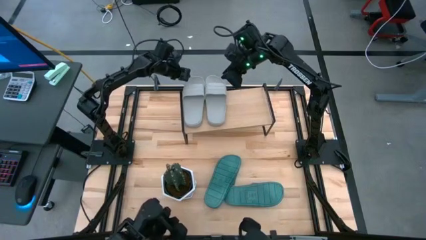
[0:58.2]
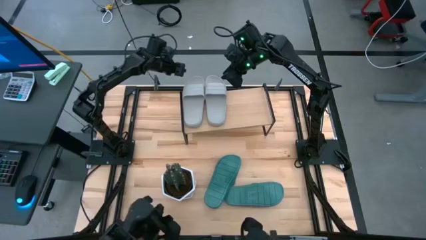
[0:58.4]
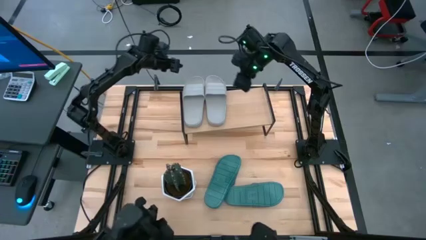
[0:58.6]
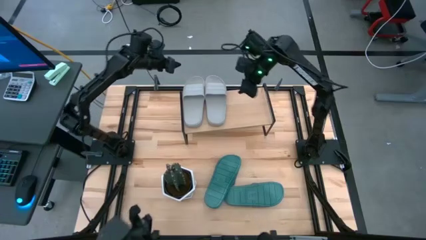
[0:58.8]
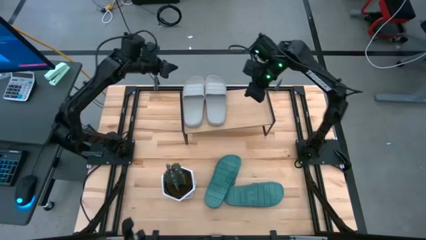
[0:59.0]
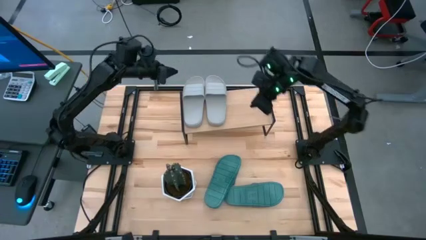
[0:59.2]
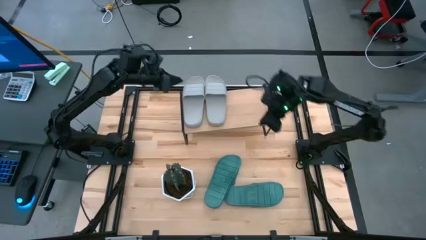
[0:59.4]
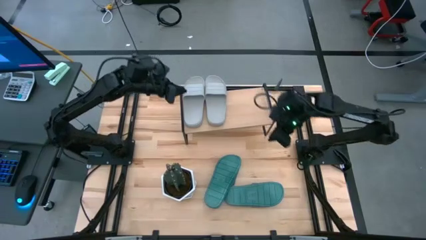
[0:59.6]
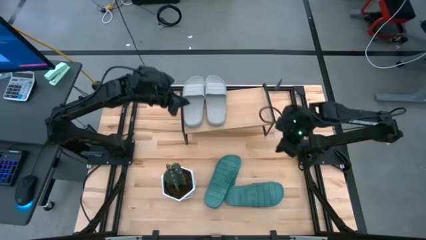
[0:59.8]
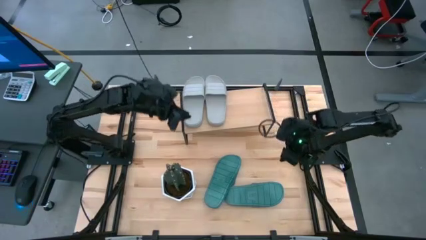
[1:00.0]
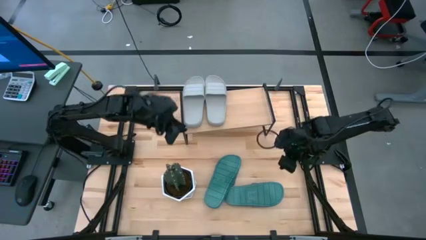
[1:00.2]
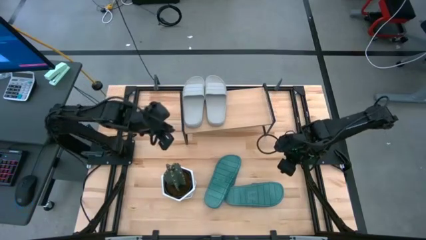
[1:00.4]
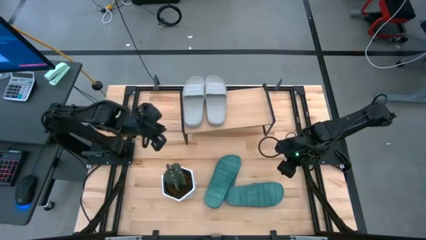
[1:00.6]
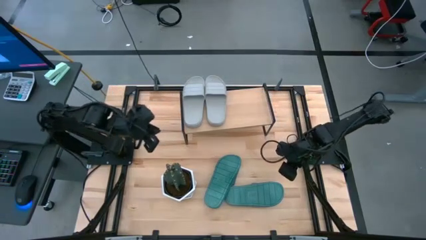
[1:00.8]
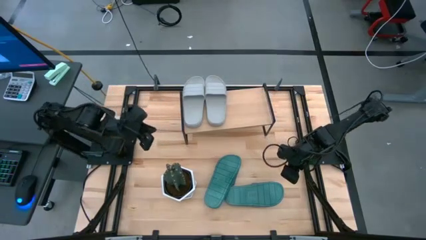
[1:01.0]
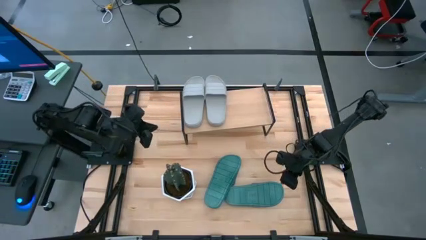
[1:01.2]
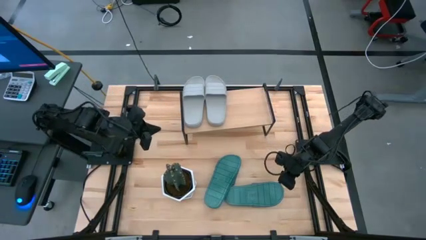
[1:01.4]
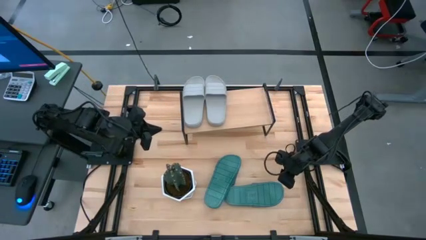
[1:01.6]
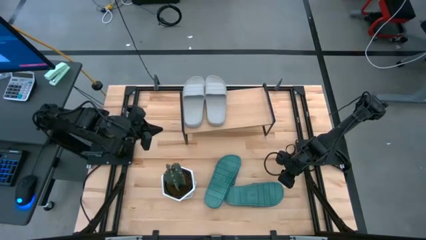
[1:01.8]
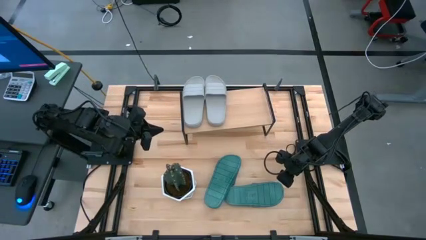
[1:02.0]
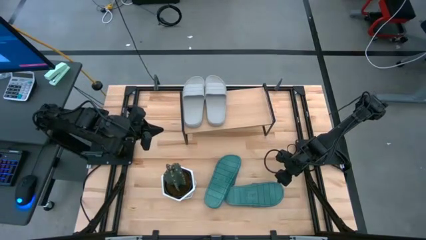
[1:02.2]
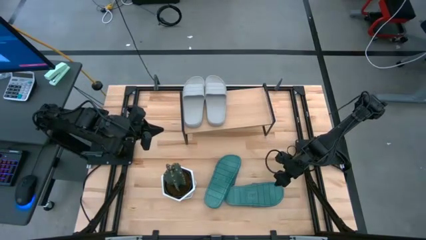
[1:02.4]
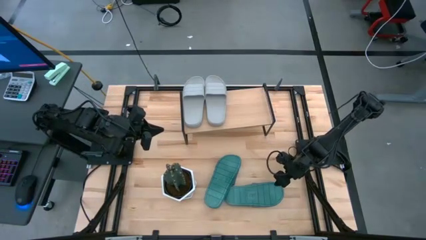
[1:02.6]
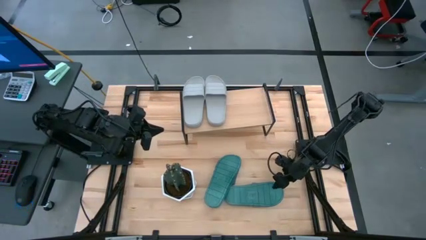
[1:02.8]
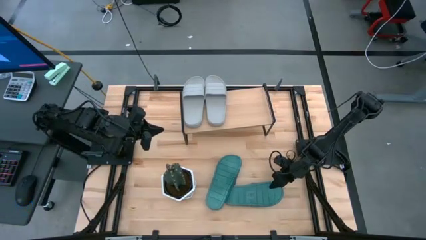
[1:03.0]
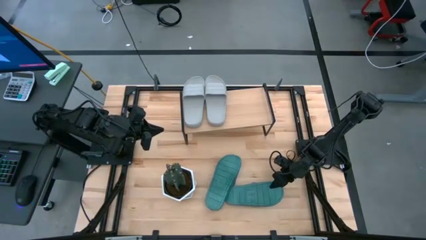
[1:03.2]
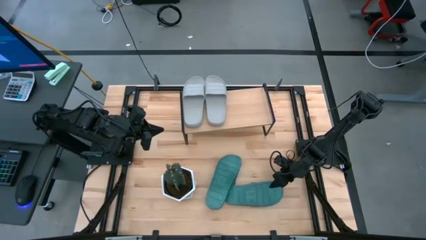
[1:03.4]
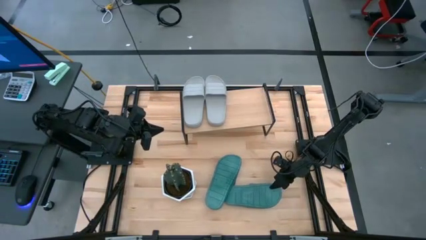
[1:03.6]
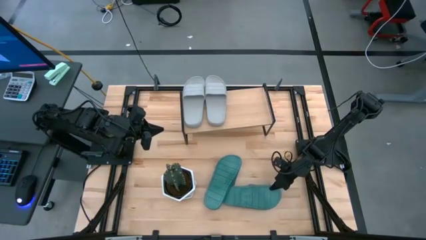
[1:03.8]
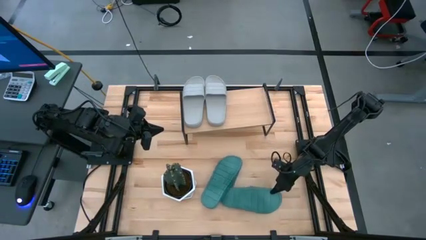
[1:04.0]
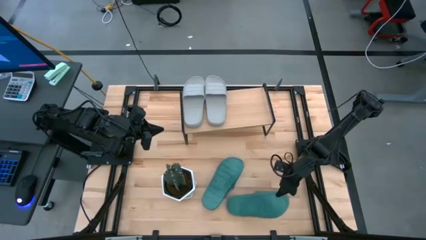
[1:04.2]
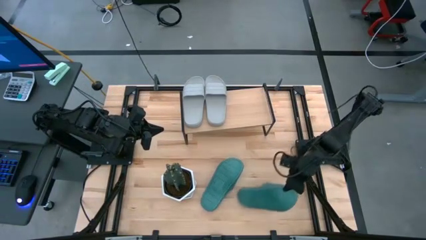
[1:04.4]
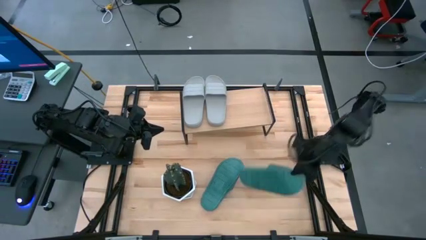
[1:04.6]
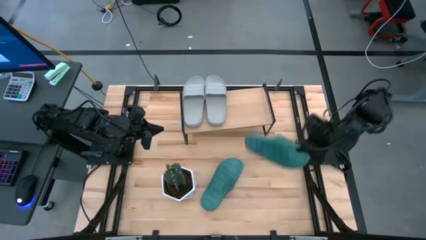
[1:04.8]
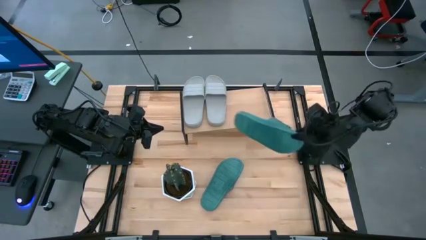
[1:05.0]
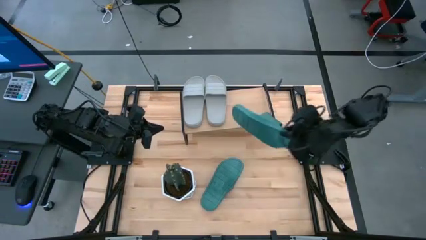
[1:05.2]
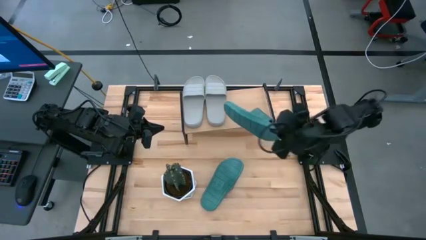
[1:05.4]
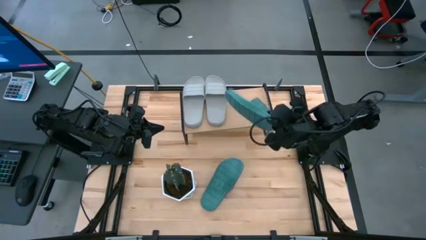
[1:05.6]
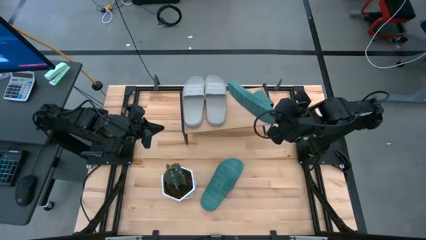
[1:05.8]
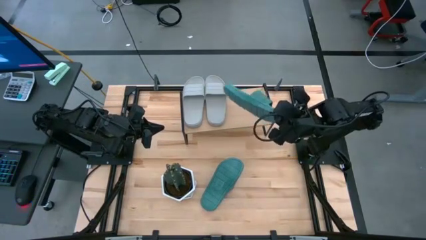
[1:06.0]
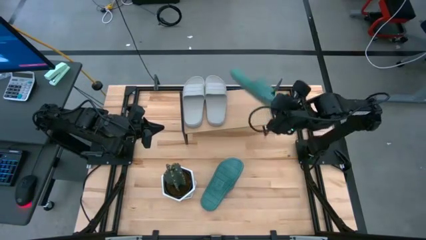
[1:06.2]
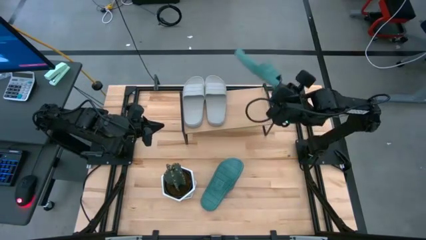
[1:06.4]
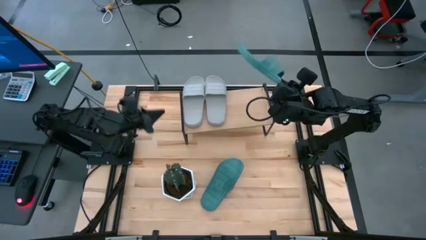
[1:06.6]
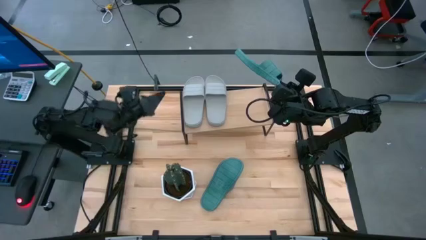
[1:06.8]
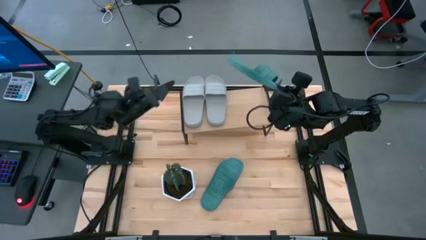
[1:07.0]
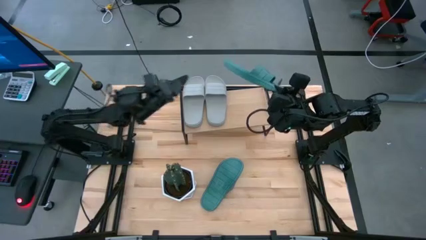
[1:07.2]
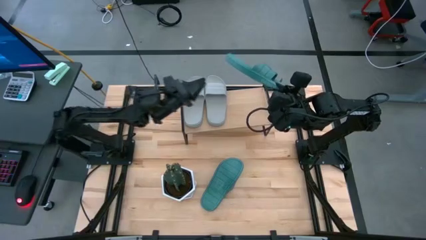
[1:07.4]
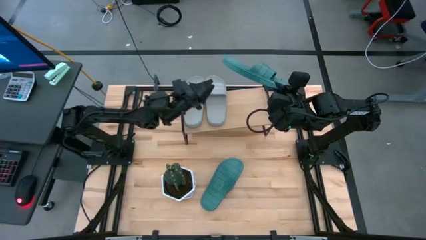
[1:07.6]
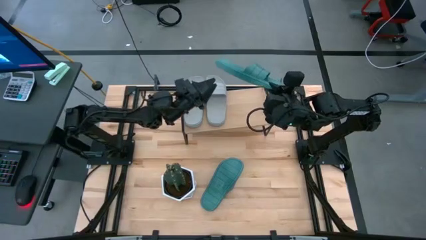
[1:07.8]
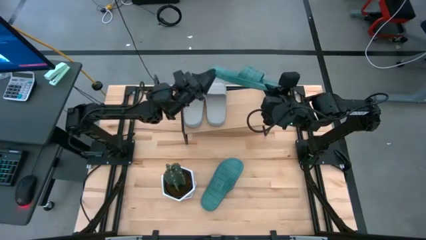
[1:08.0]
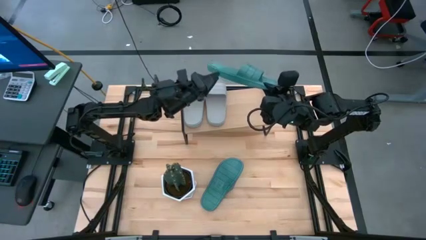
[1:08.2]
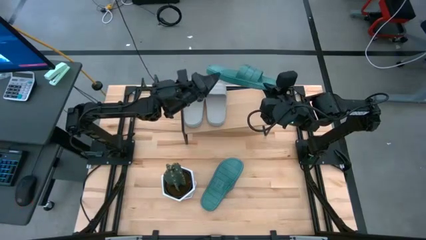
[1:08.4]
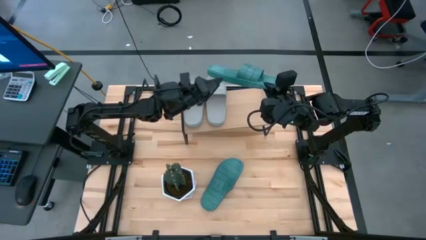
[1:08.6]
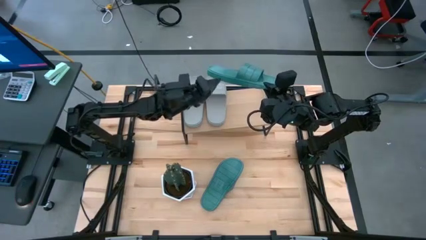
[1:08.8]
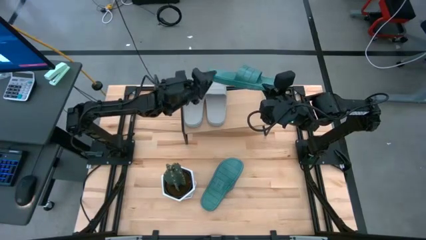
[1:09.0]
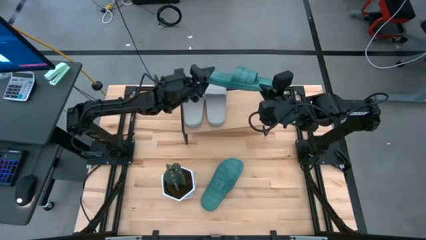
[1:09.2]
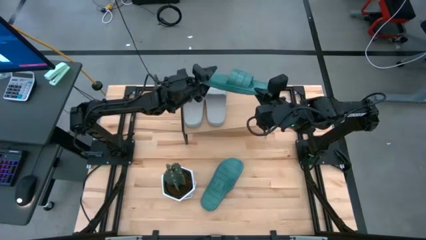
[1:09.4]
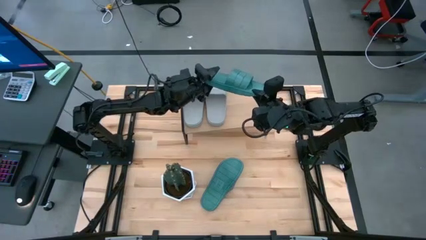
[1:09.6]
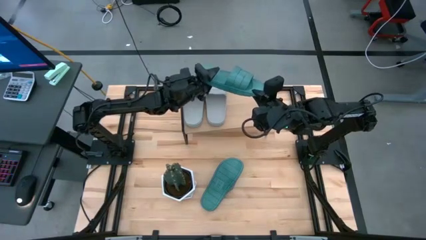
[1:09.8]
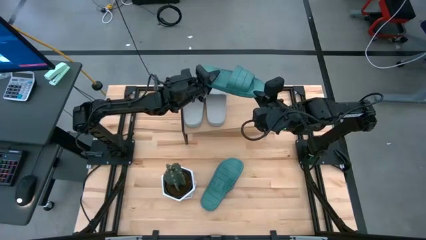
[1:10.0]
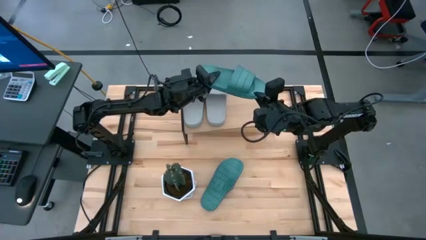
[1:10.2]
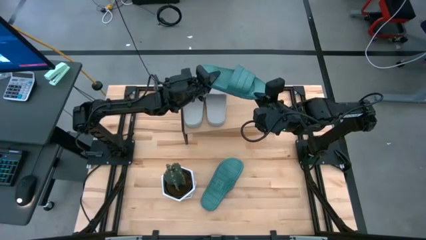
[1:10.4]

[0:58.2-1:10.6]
Task: Pick and place slides into the shelf
Put the right green slides on the shelf

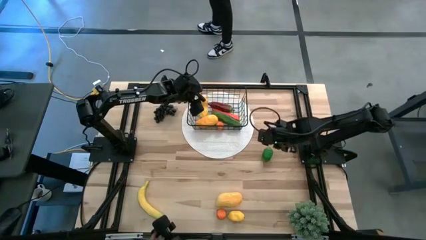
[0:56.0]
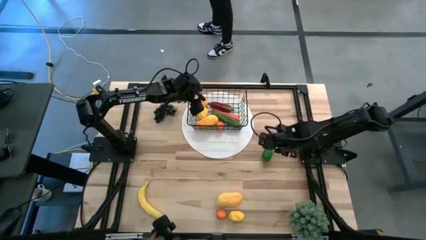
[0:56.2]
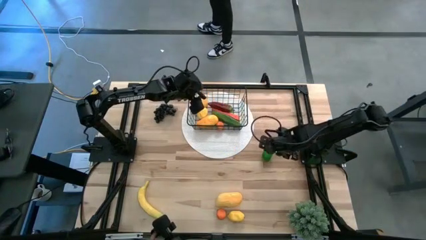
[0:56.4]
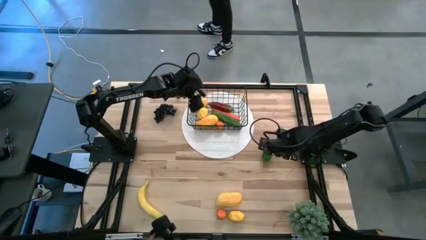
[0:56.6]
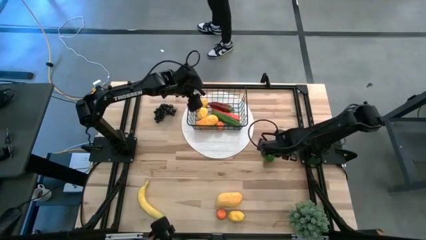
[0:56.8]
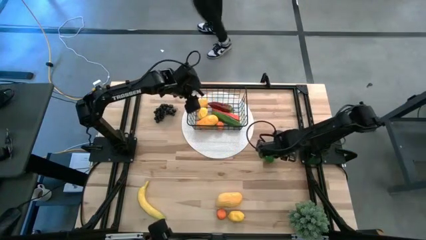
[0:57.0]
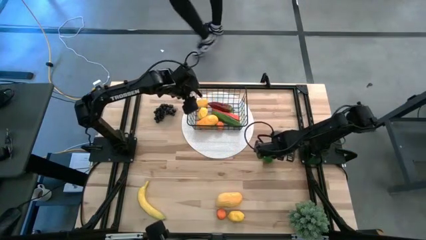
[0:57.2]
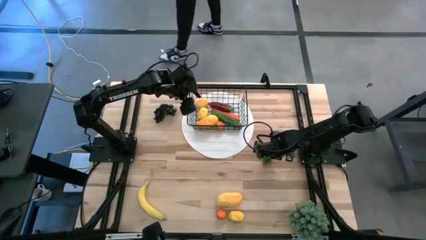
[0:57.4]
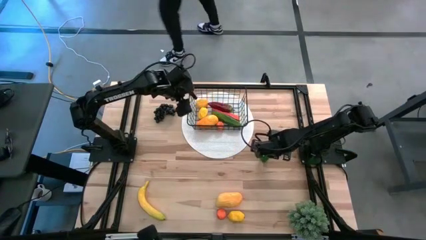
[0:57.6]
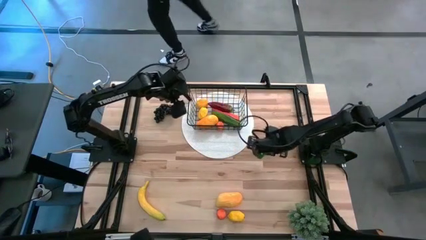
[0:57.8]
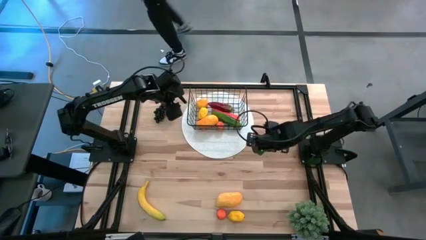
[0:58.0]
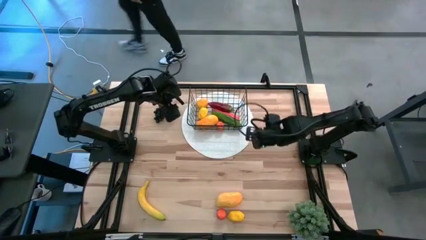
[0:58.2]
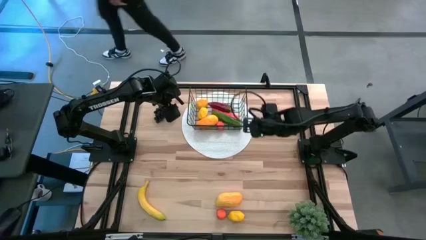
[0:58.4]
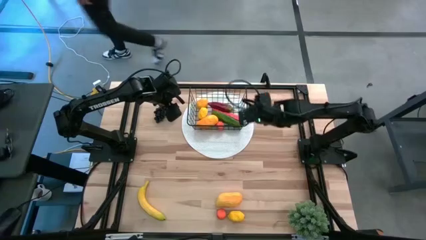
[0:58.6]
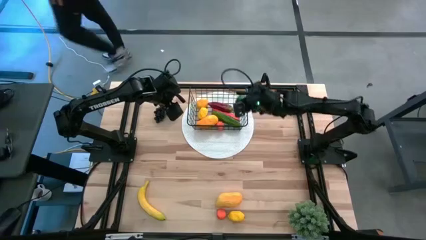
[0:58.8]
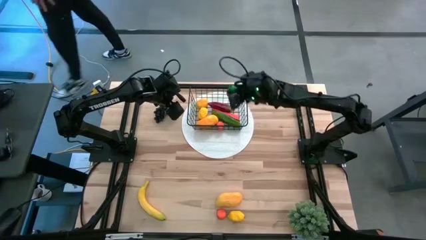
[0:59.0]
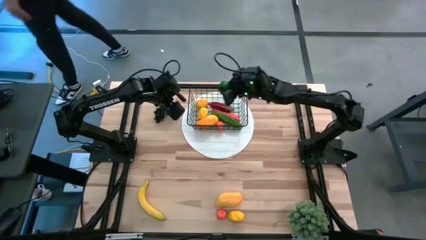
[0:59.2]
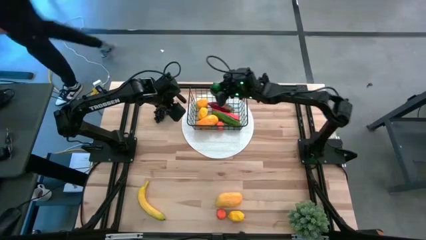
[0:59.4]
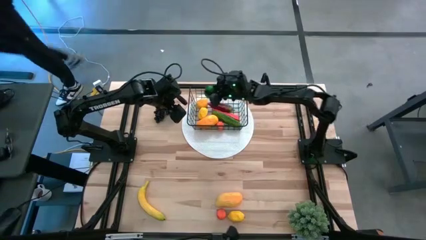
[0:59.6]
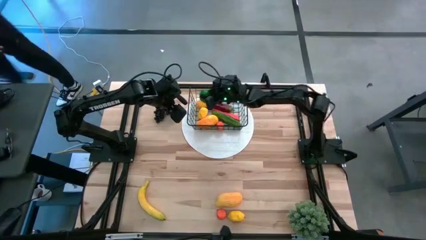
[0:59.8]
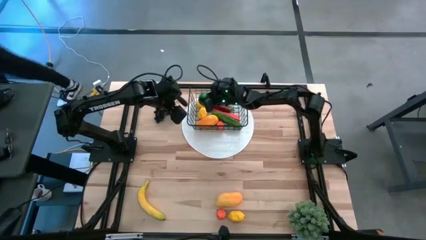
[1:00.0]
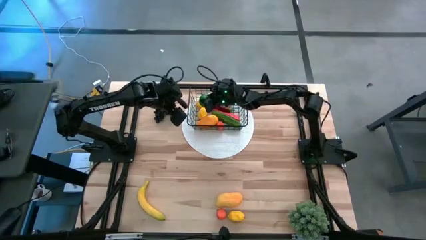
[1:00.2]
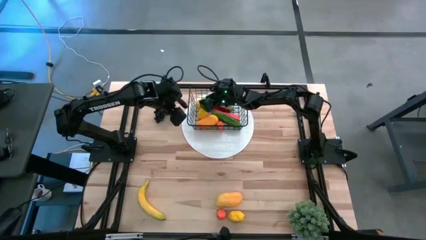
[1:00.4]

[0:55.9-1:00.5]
Task: Build produce basket
Put the green lime into the black wire basket
